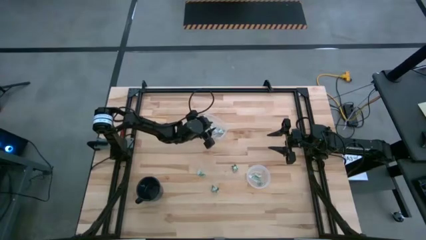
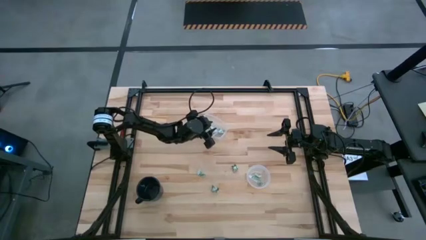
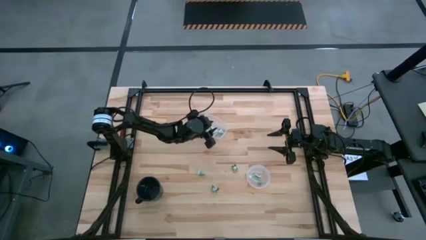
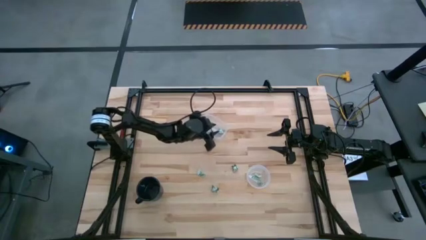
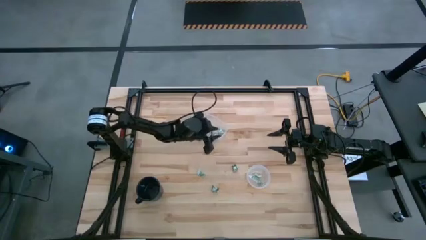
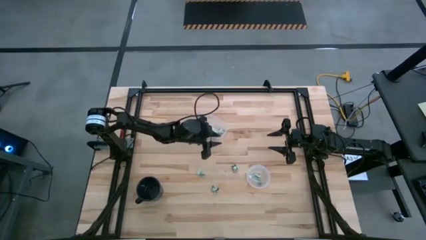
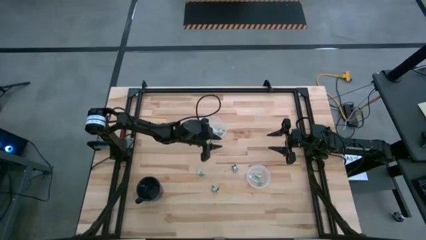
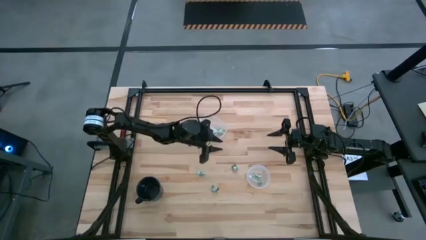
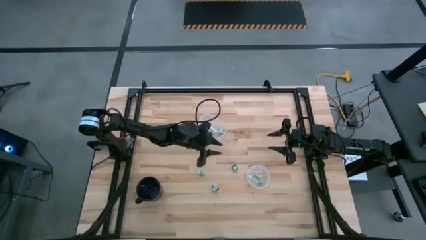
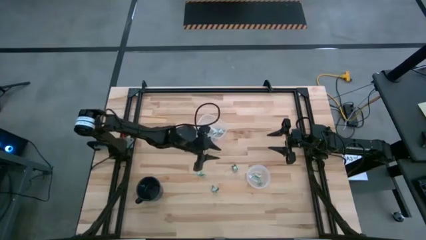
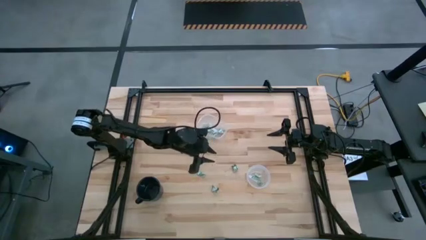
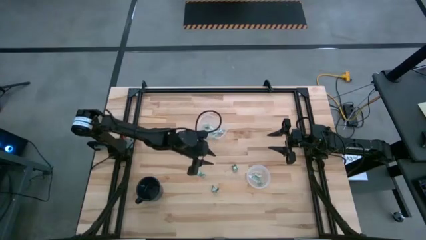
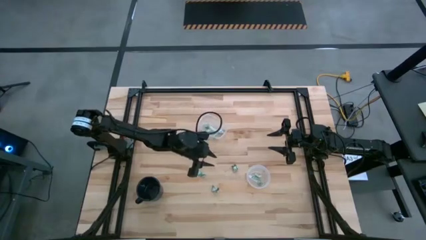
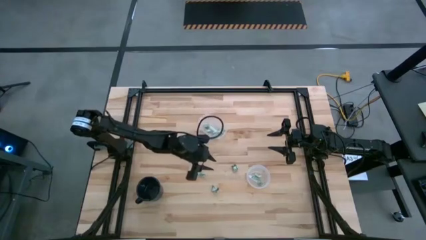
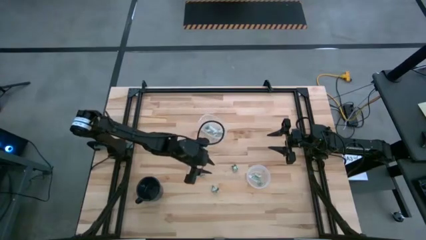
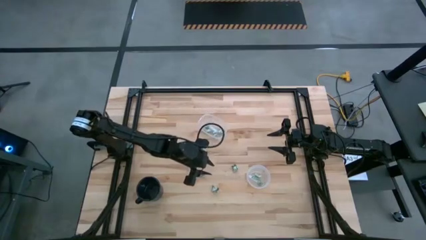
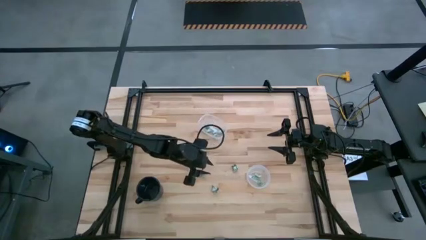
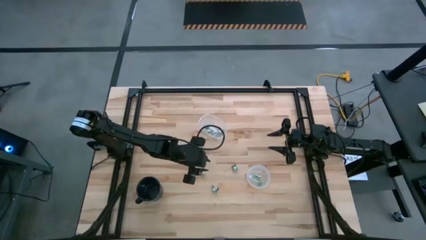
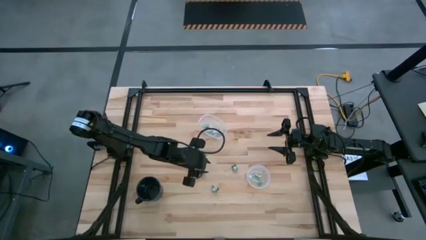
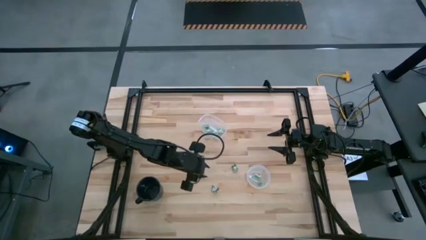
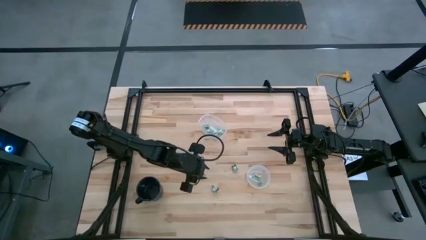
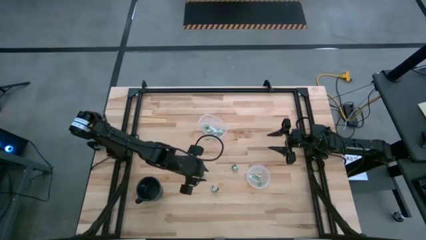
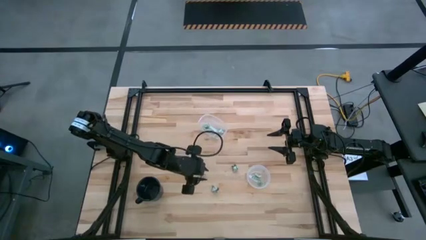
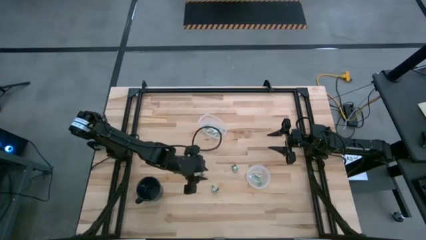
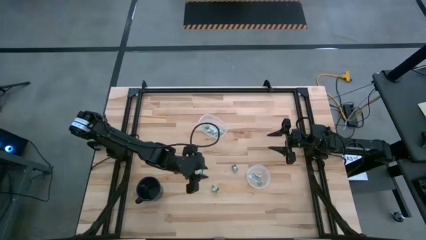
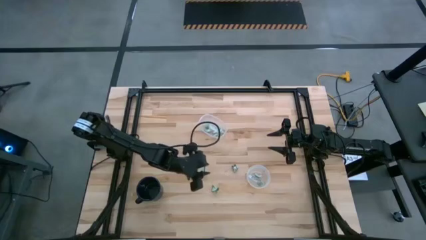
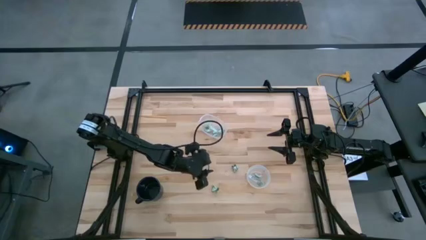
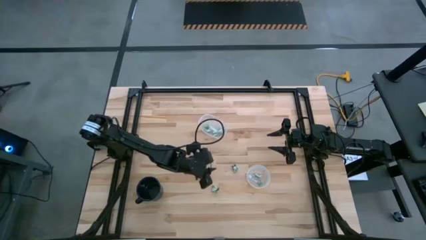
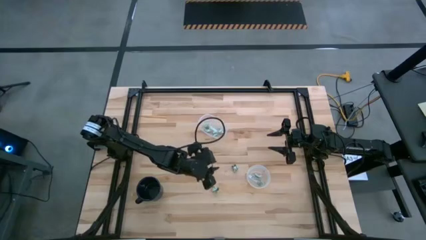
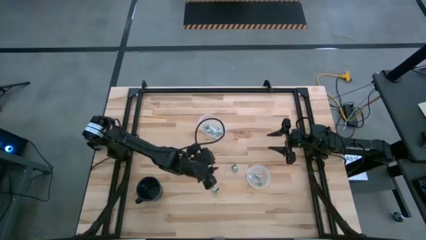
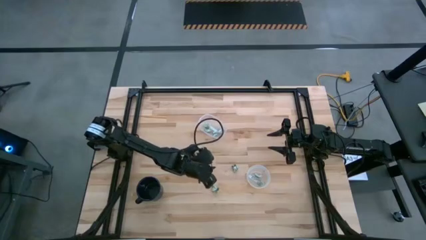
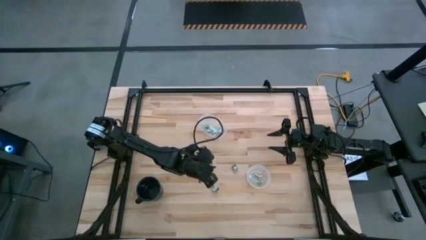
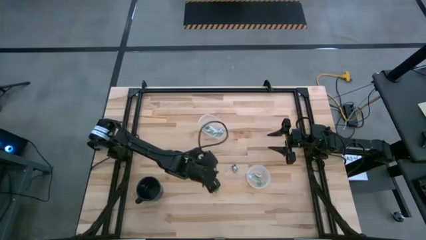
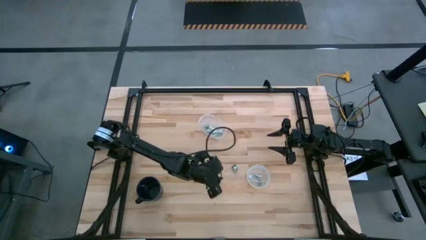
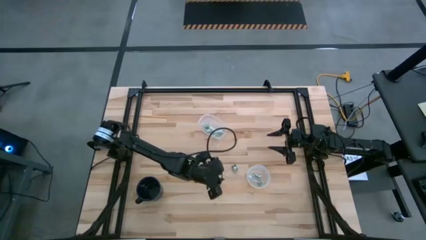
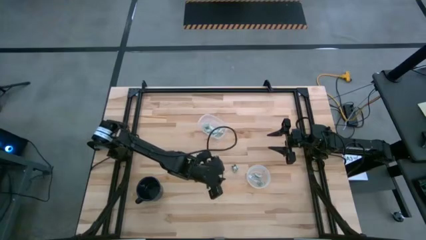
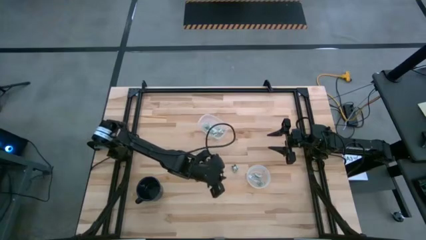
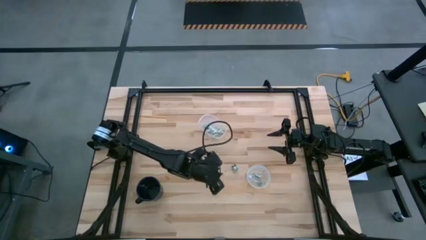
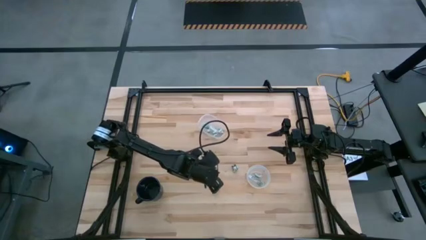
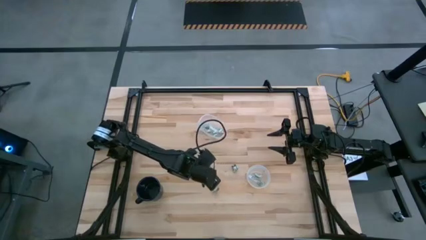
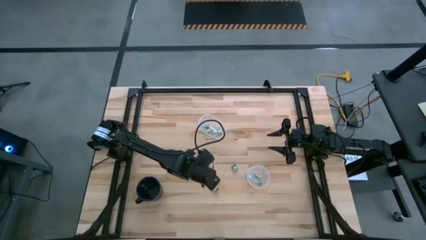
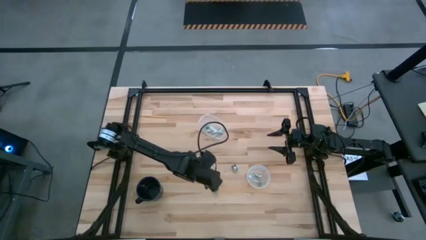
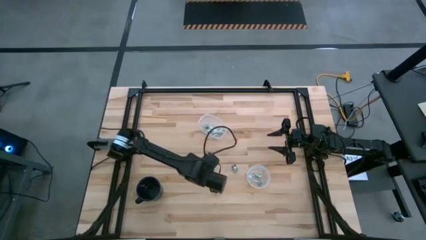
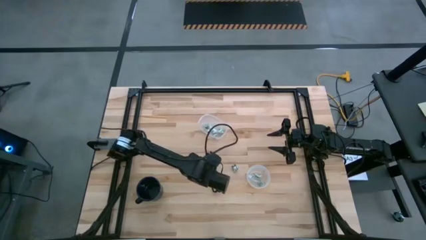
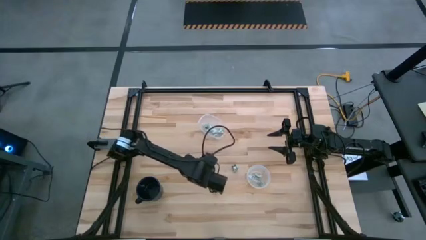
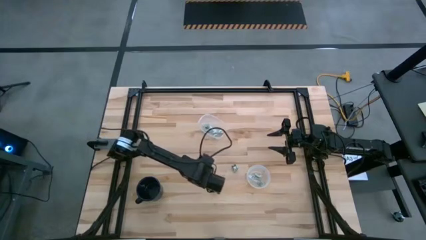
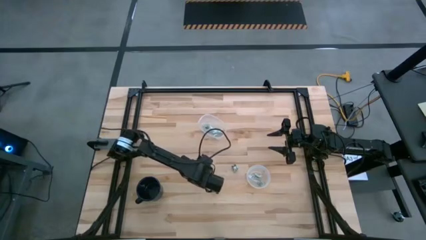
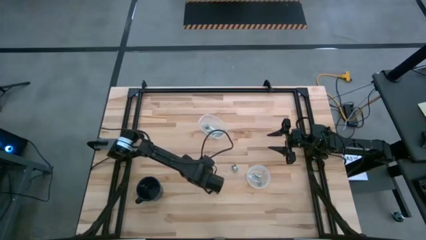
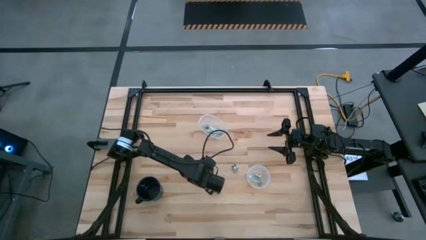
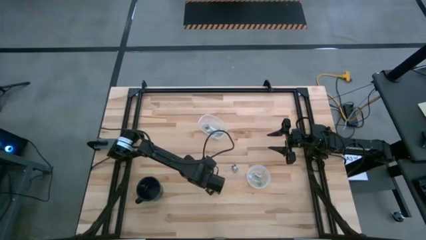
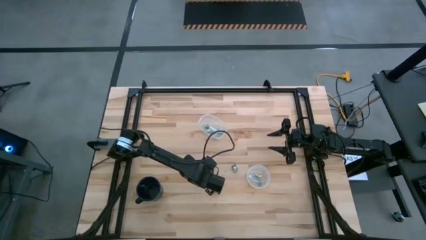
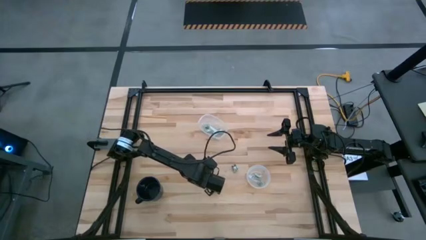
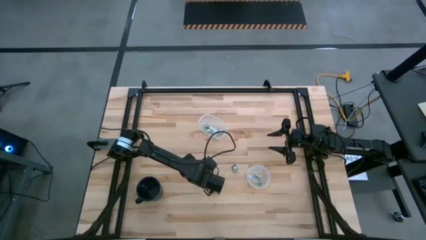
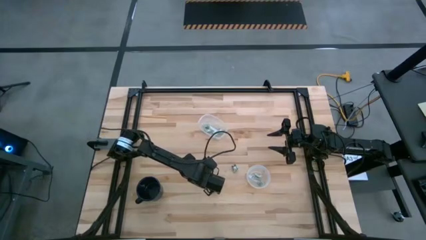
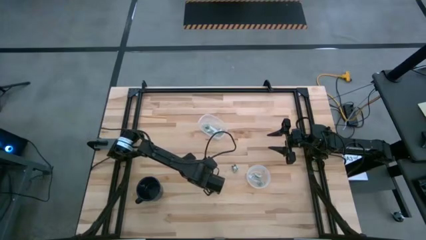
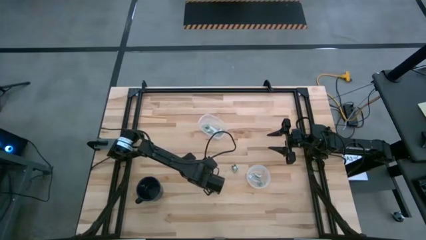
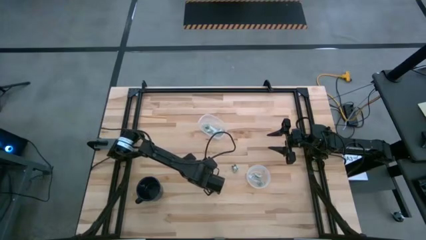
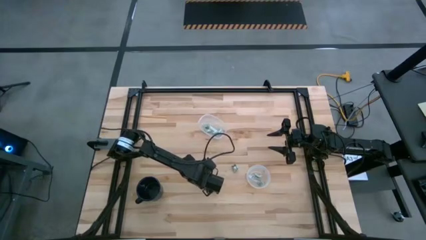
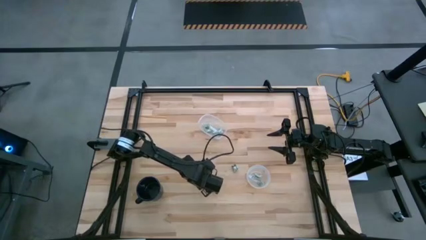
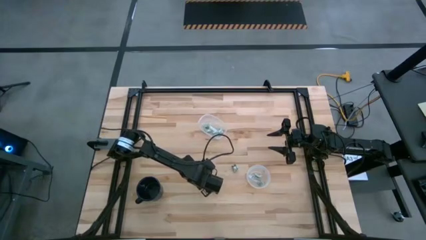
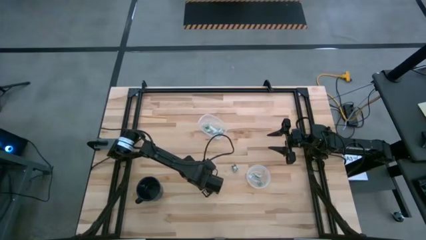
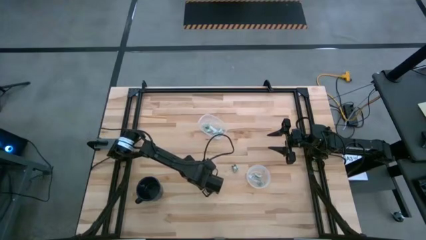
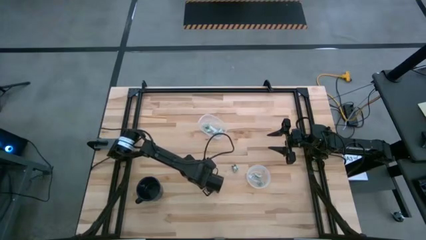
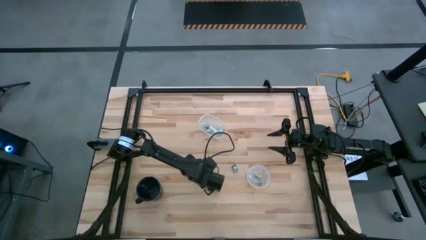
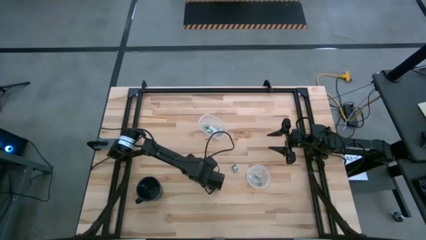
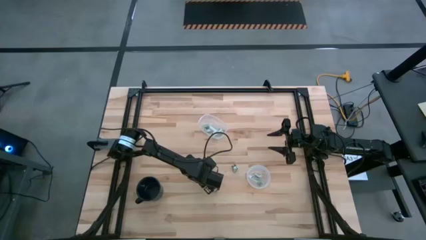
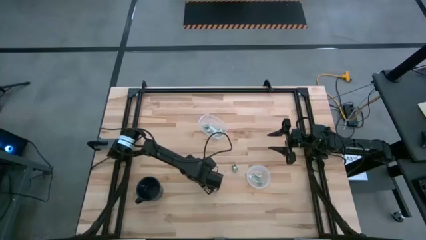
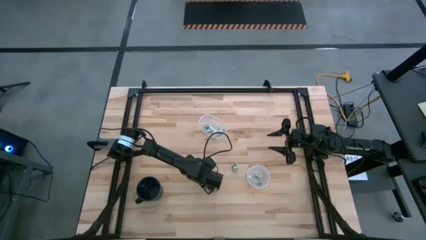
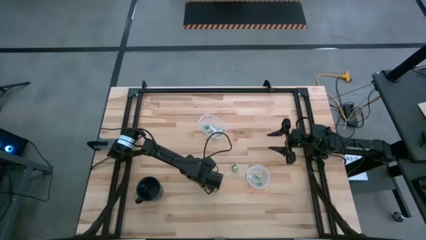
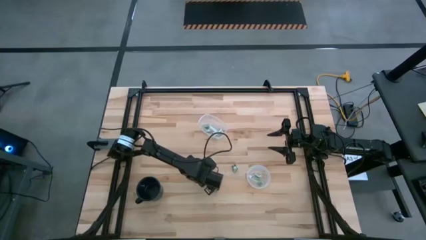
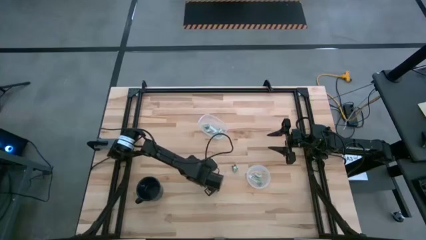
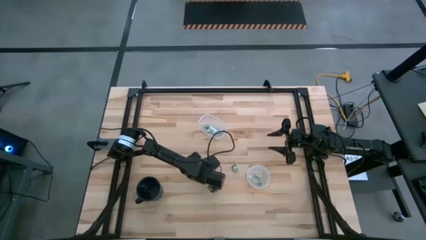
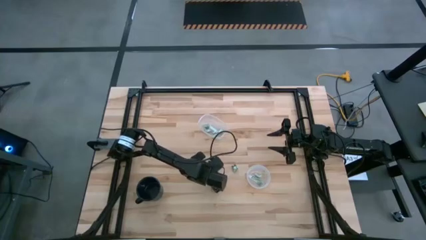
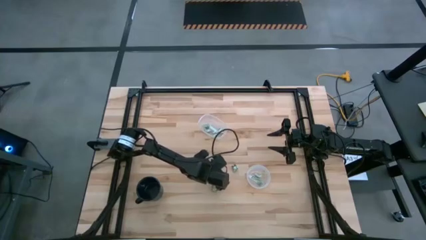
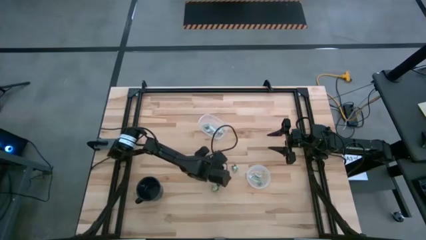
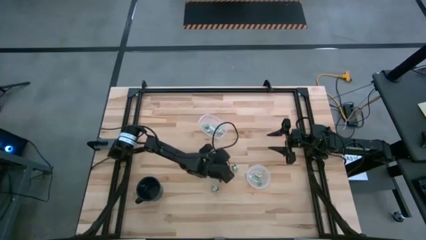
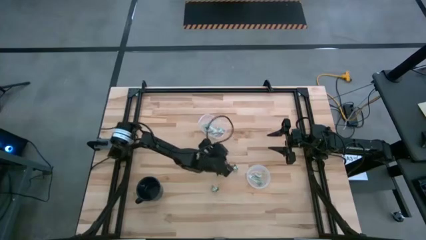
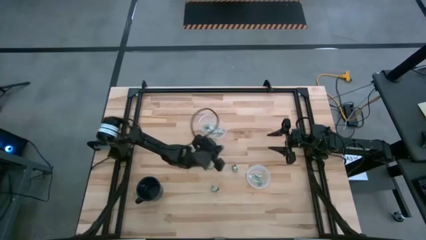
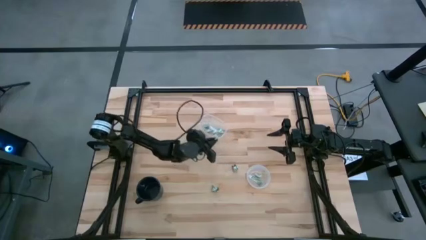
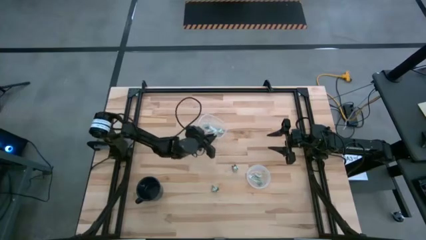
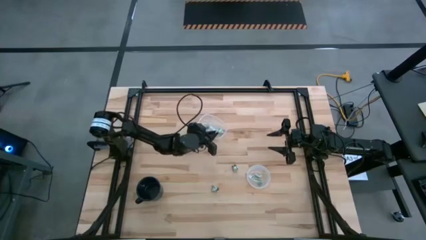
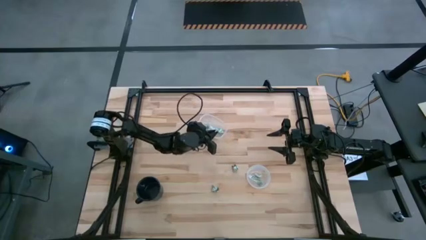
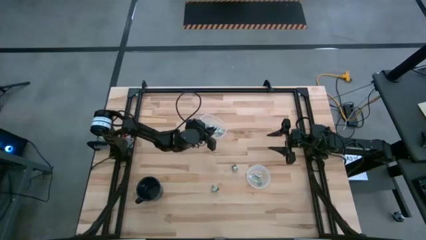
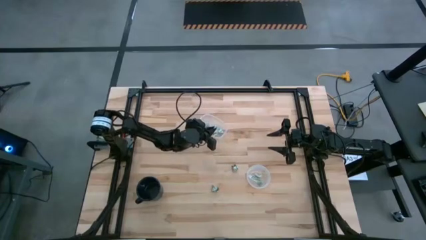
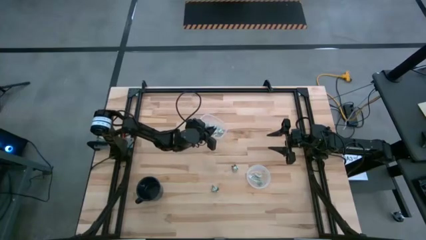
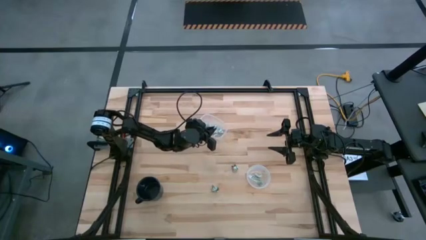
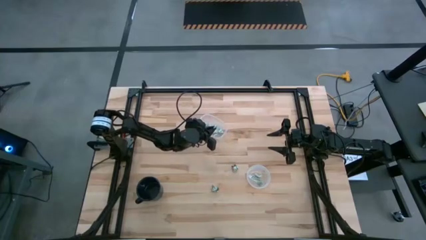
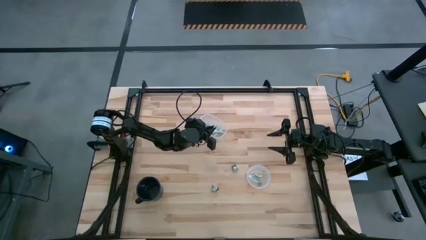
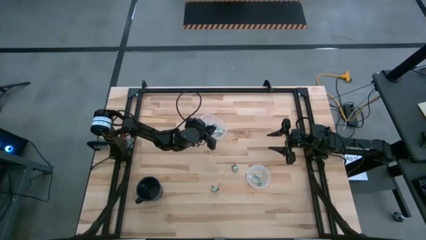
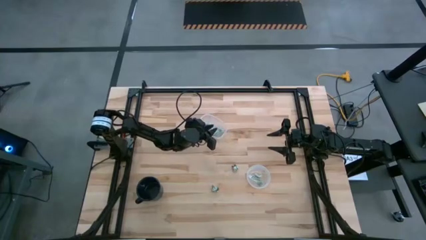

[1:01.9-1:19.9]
Task: Pick and place Stevia / Truvia into bins
Put the stevia packet into the oval transparent container
